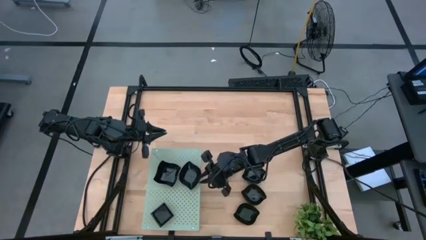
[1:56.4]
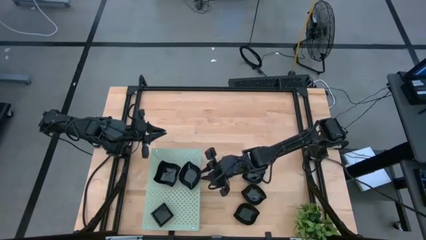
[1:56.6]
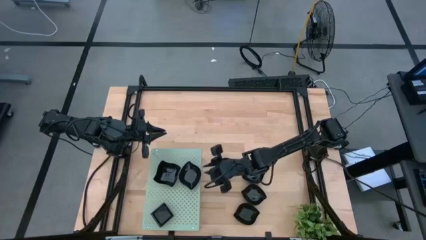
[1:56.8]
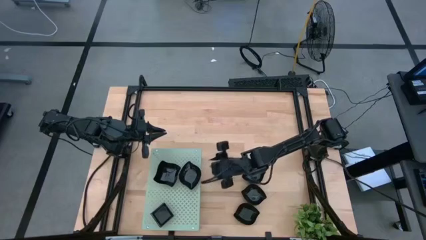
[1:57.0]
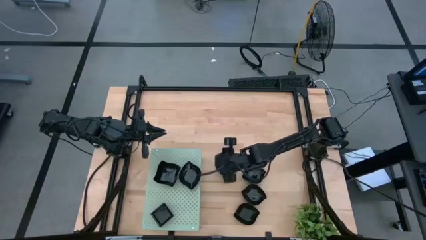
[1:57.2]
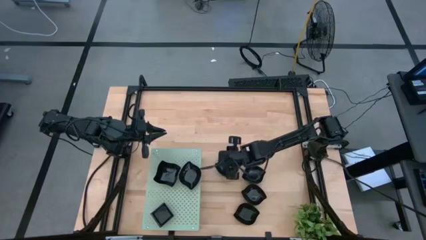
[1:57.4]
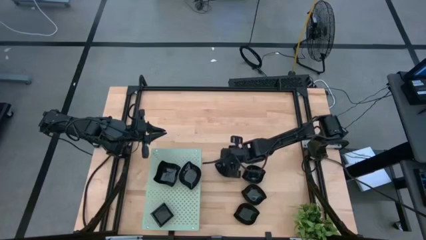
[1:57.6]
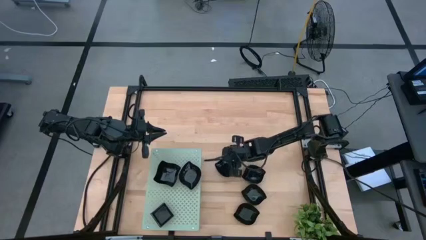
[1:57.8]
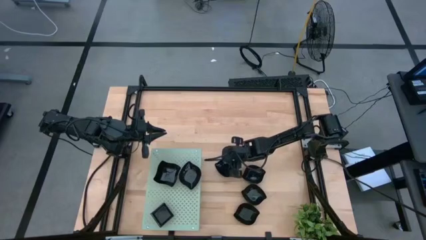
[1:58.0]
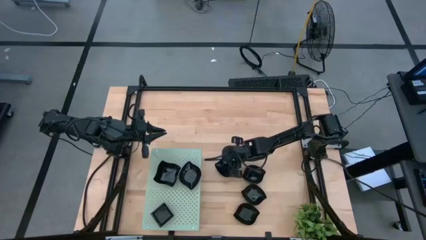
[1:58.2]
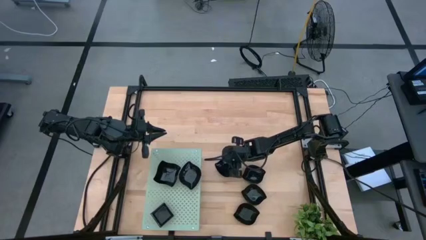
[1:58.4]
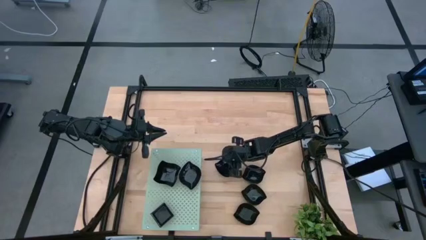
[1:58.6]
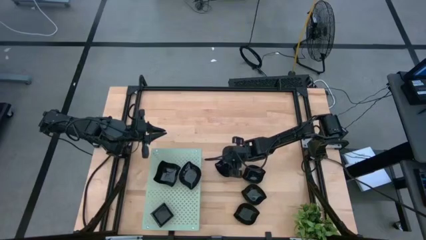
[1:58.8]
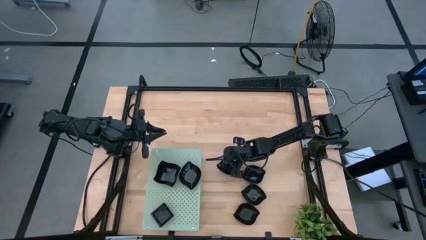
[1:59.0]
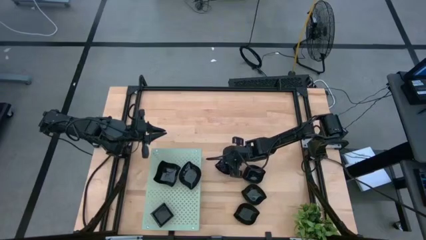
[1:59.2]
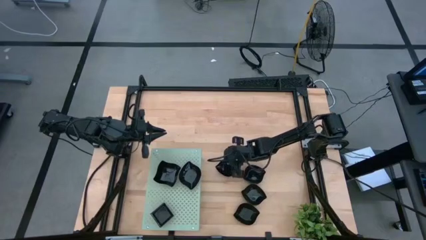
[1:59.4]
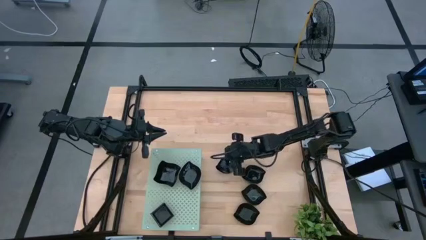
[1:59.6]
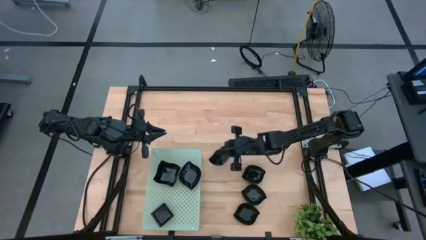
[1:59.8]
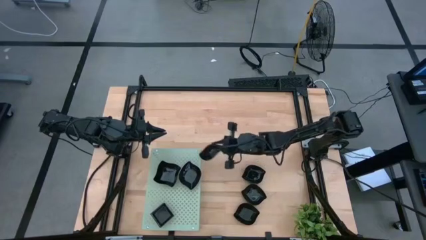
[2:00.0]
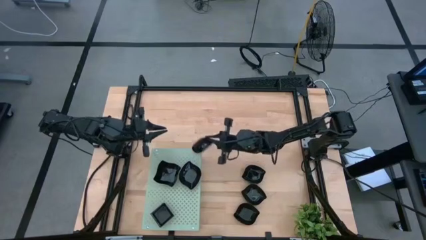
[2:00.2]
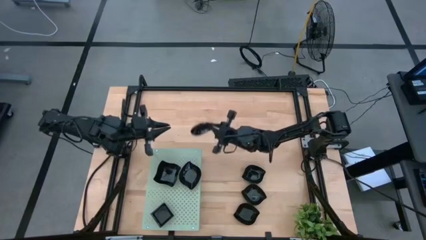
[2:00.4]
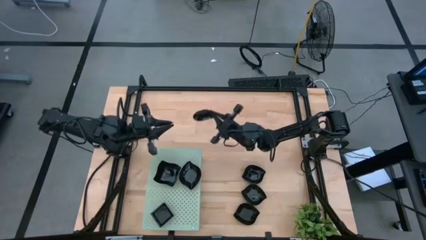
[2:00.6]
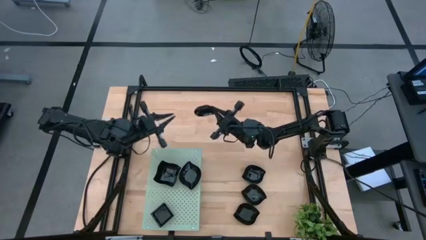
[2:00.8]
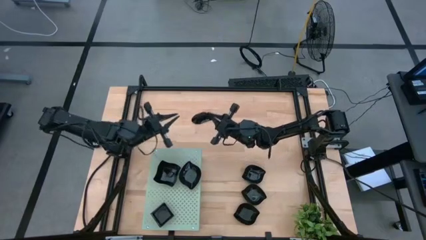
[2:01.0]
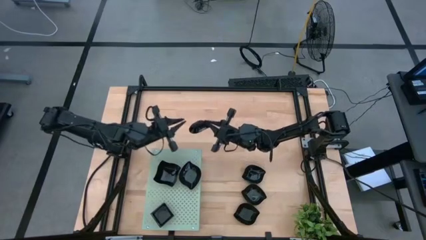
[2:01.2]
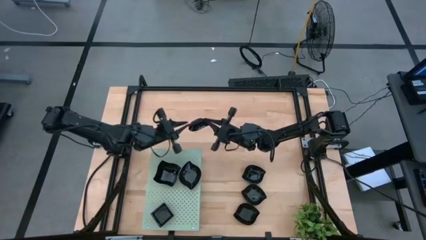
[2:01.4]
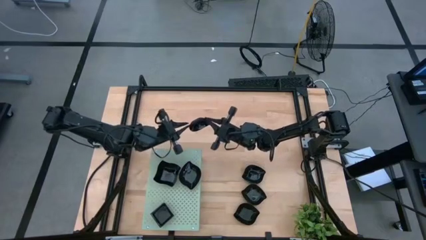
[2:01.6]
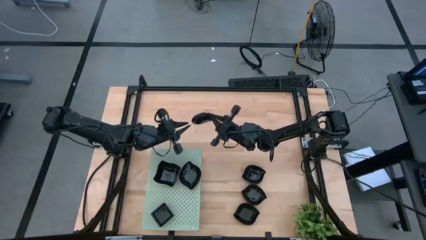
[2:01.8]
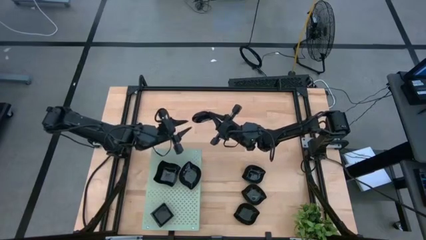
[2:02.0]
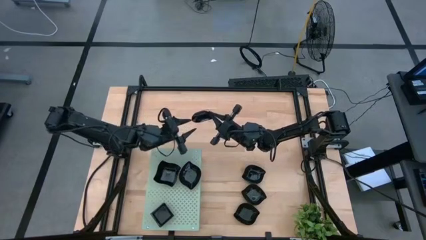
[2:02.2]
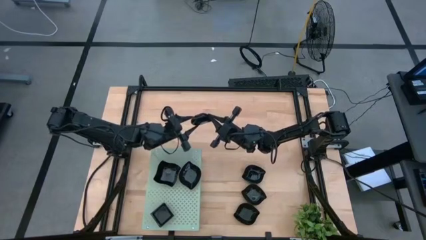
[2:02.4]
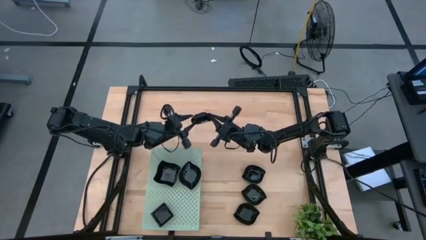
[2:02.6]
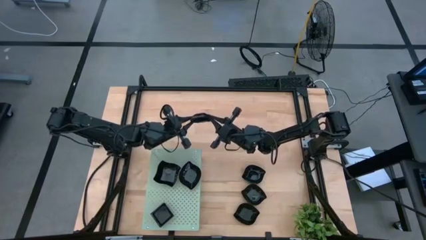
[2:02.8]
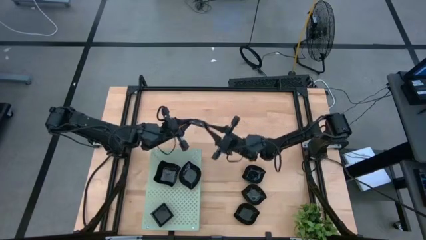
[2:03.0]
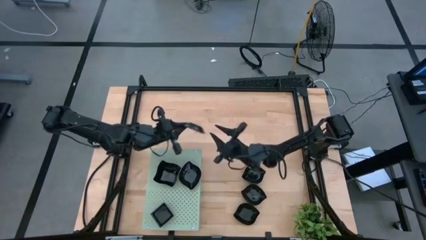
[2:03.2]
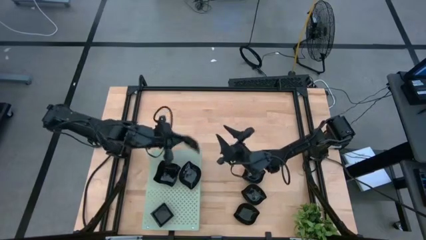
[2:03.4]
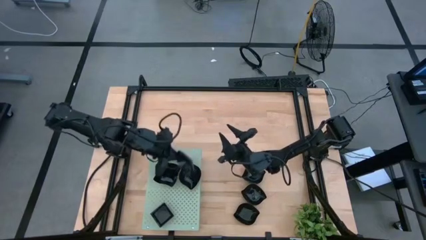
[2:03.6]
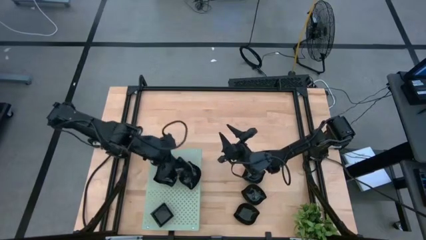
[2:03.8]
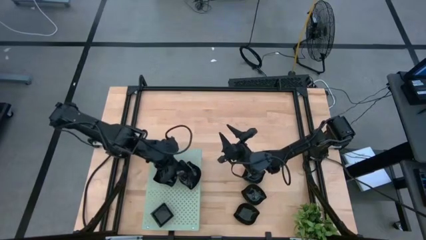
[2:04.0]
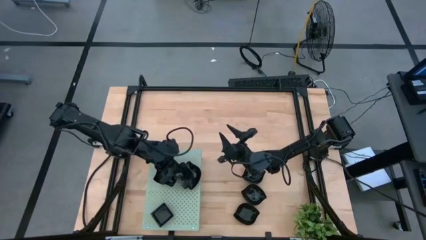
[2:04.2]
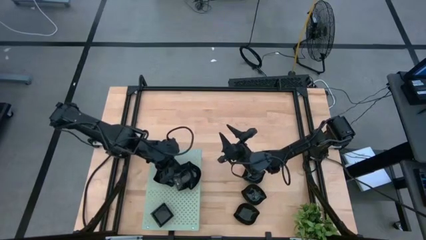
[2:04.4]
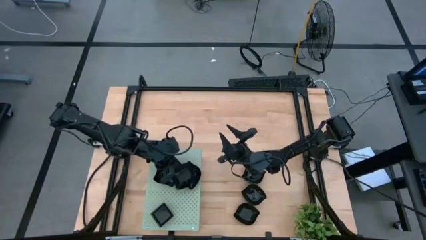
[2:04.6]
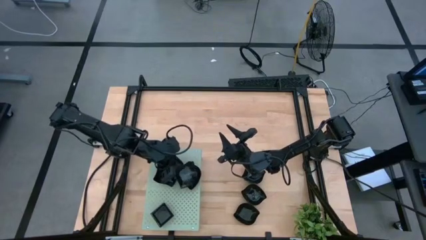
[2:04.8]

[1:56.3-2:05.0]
Task: Pick & Place Mini shaped plates
Stack the leaf shaped plate on top of the other leaf shaped plate on the shelf

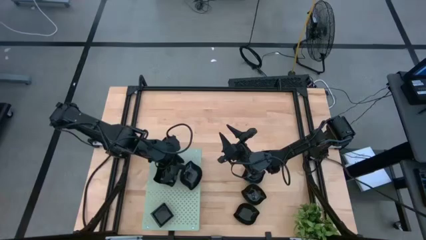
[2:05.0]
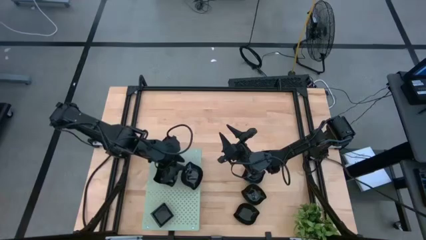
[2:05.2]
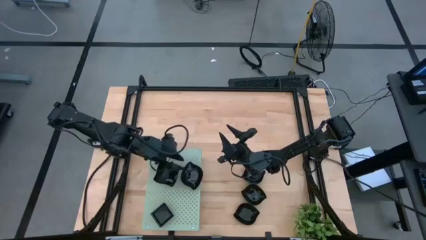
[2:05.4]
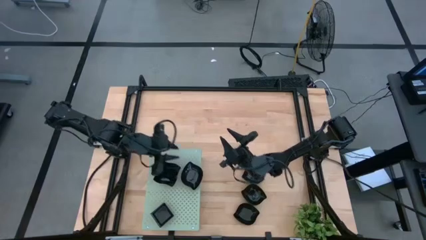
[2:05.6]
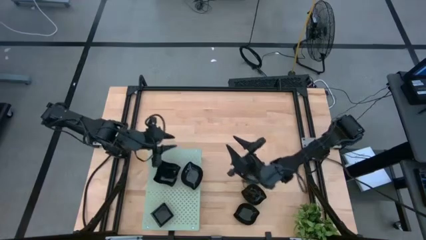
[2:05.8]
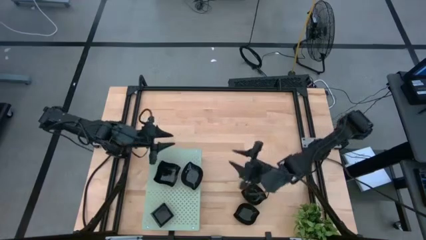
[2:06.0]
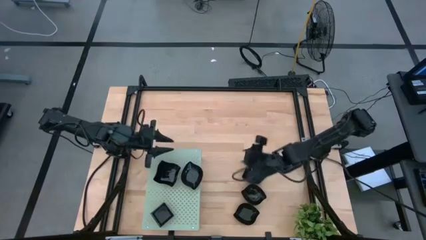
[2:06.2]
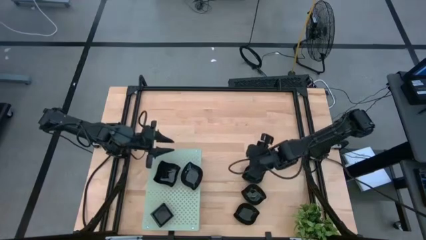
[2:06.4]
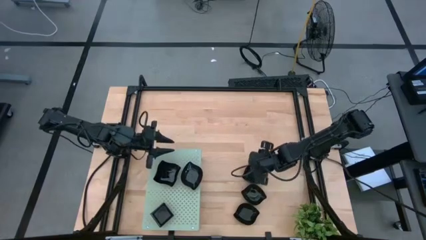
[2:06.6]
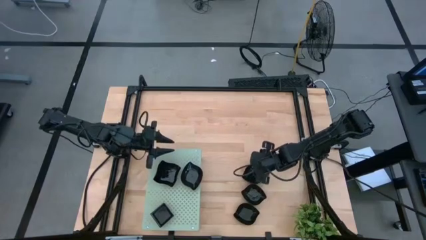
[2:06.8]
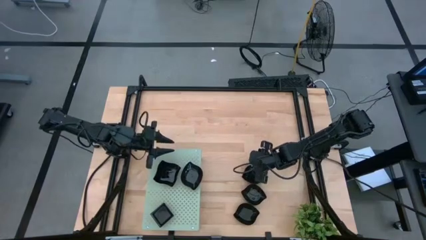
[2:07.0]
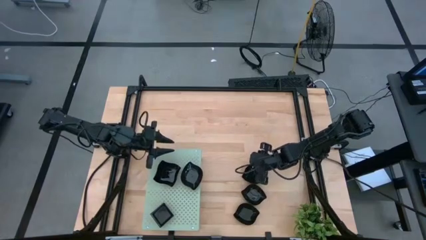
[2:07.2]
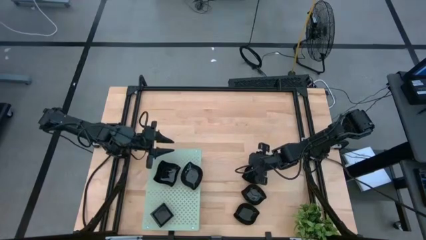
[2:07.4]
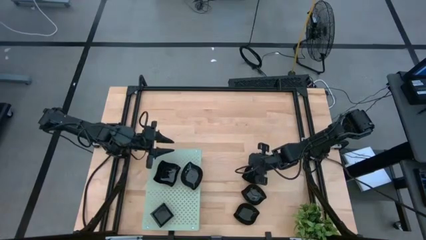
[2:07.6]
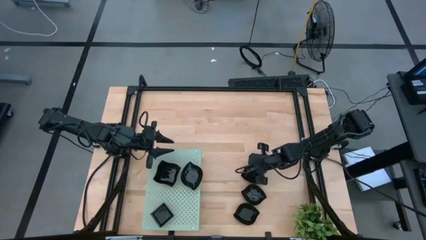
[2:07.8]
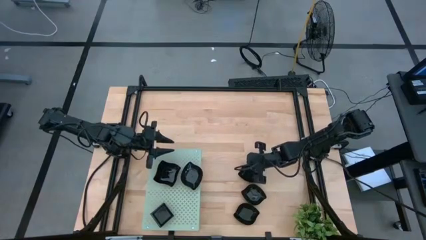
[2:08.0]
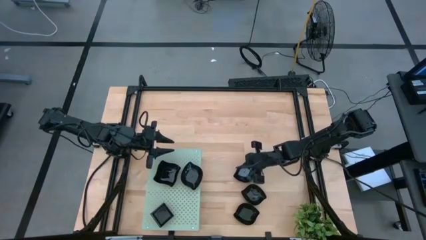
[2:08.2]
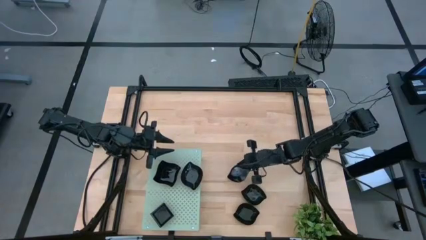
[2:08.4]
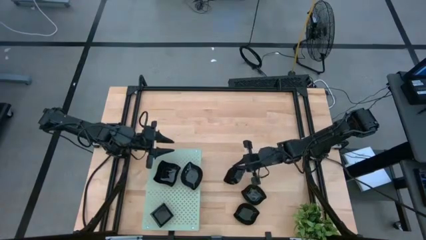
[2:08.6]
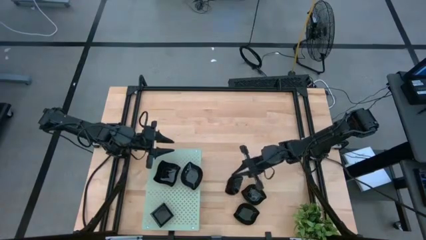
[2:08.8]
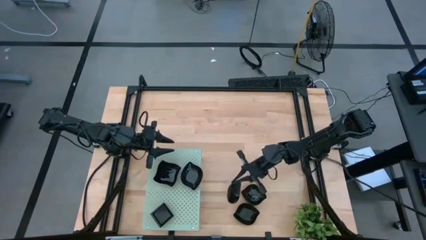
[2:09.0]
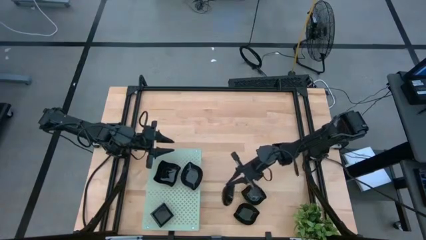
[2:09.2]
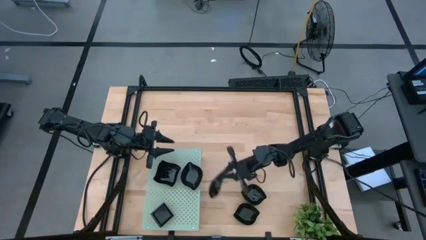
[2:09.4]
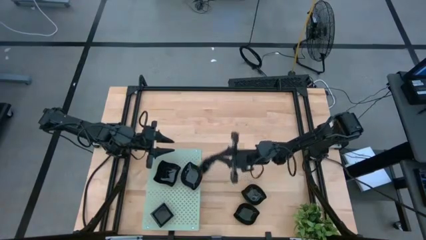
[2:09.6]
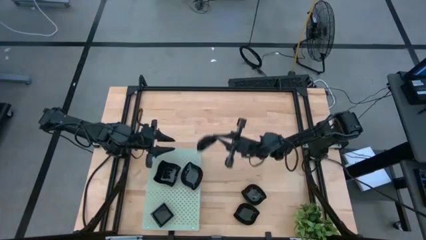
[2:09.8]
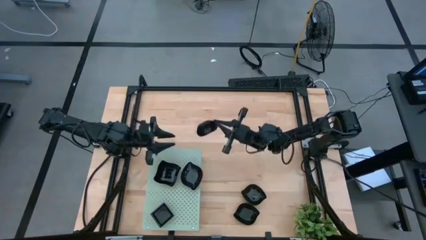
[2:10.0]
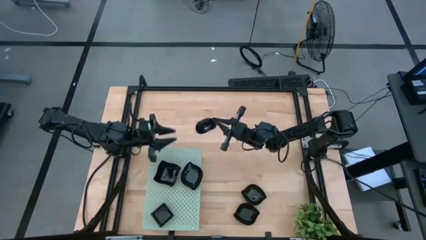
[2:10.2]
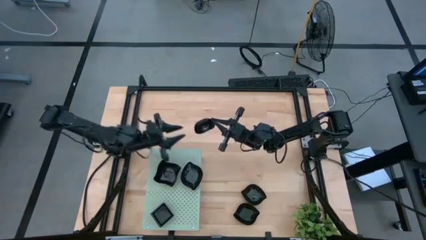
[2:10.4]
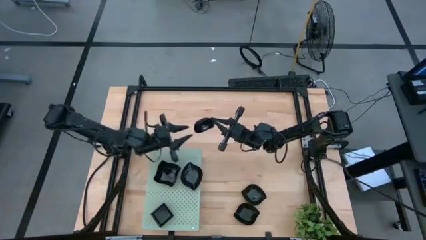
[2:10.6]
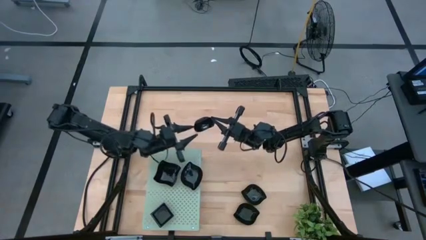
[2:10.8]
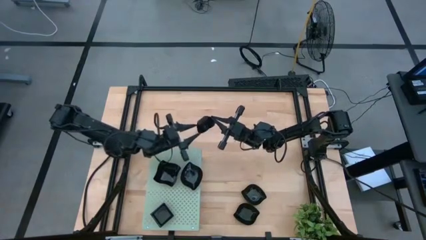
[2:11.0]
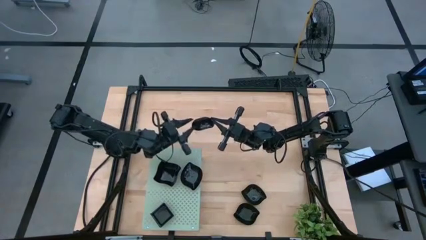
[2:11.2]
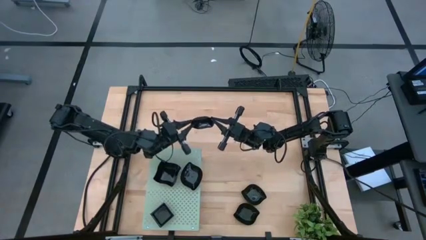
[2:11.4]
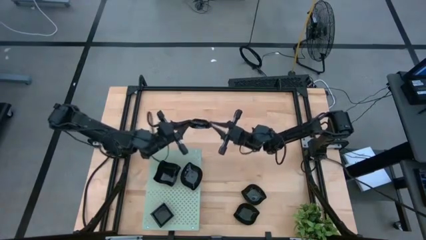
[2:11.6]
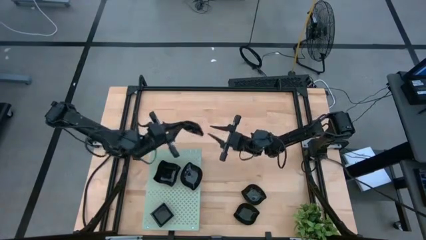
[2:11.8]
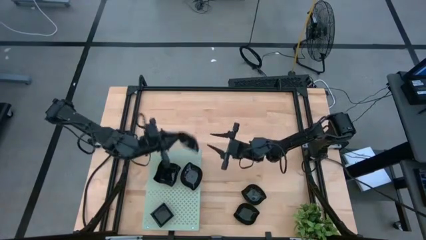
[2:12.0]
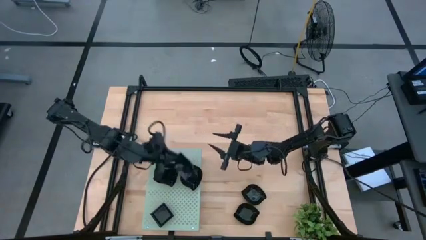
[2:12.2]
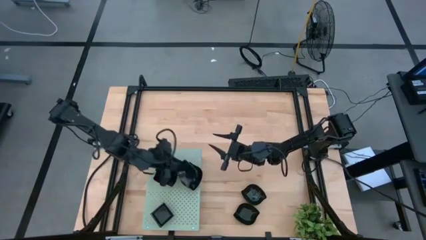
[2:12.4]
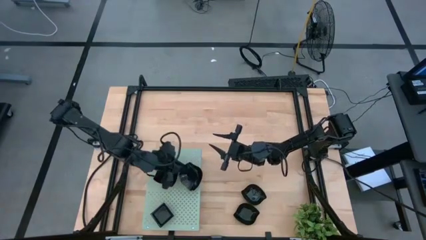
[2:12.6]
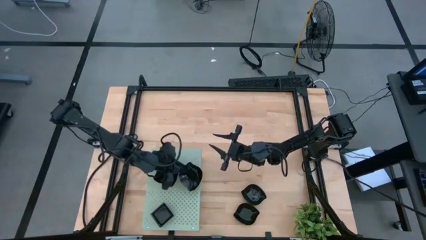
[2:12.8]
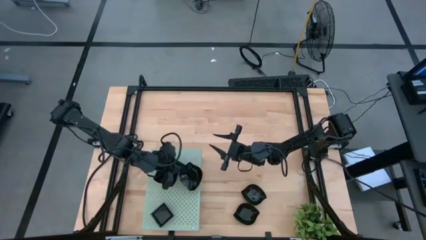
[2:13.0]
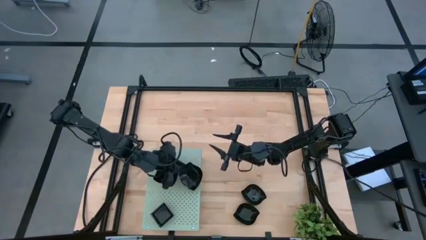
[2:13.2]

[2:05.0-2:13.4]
Stack the leaf shaped plate on top of the other leaf shaped plates on the shelf
